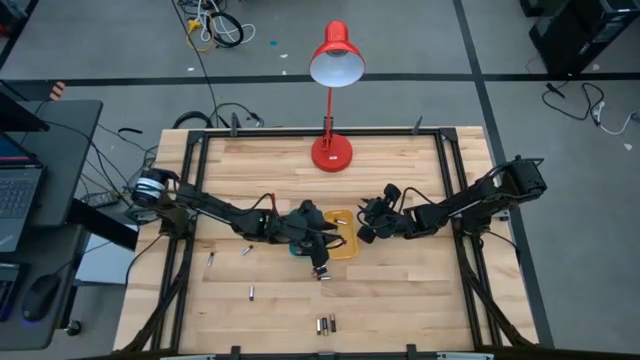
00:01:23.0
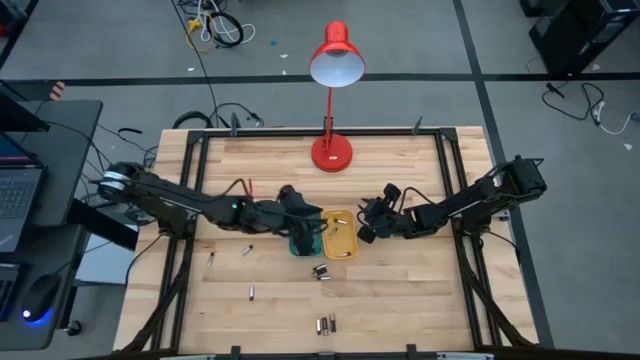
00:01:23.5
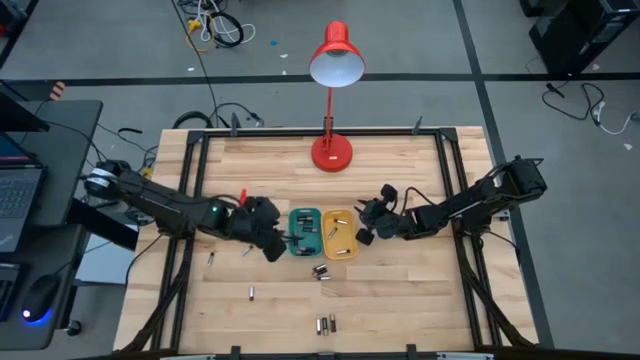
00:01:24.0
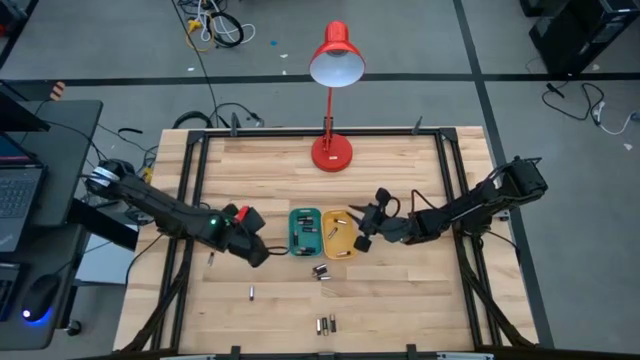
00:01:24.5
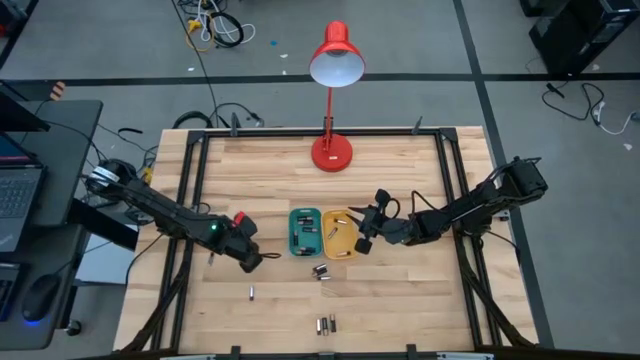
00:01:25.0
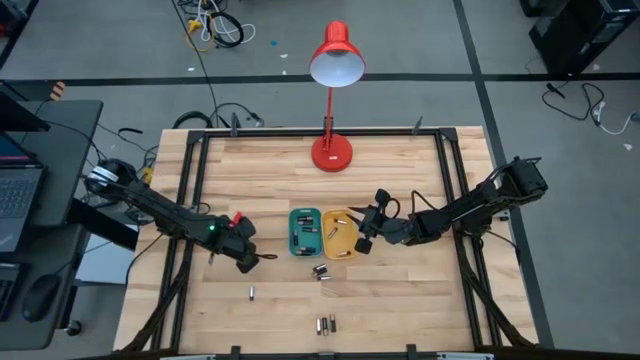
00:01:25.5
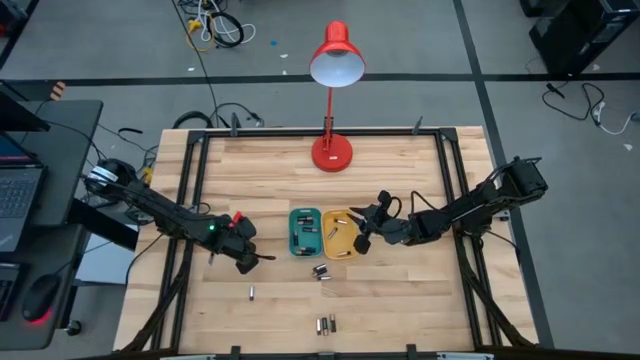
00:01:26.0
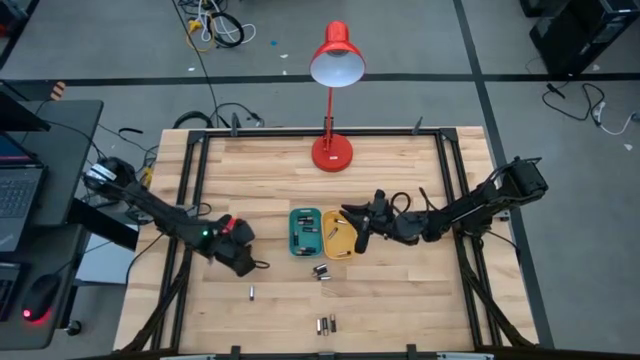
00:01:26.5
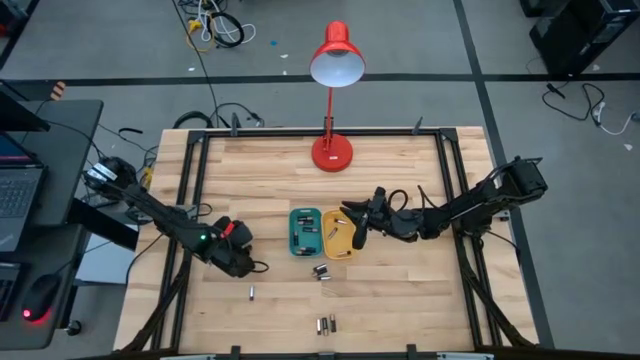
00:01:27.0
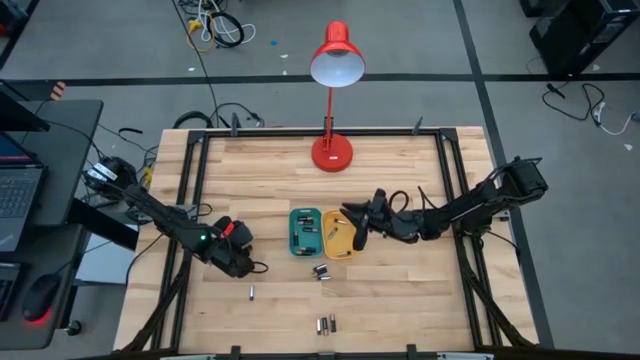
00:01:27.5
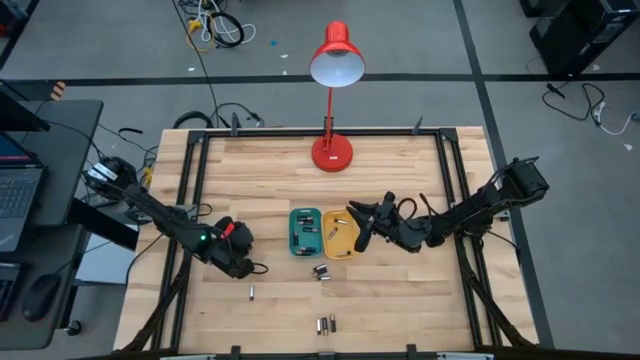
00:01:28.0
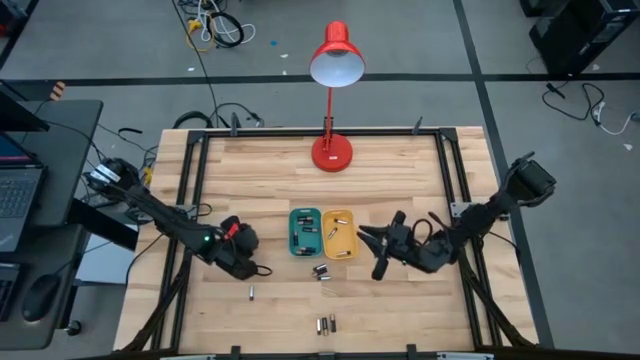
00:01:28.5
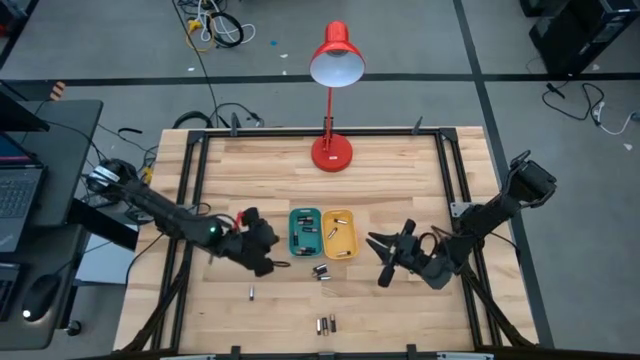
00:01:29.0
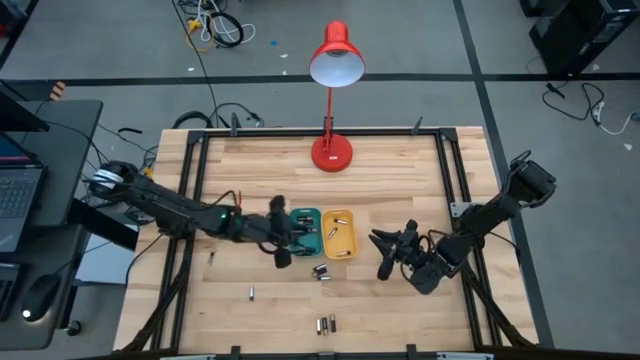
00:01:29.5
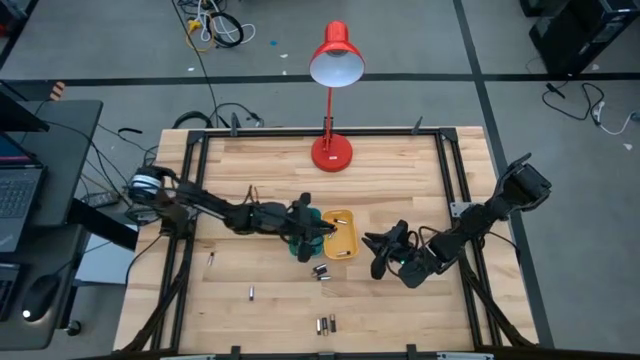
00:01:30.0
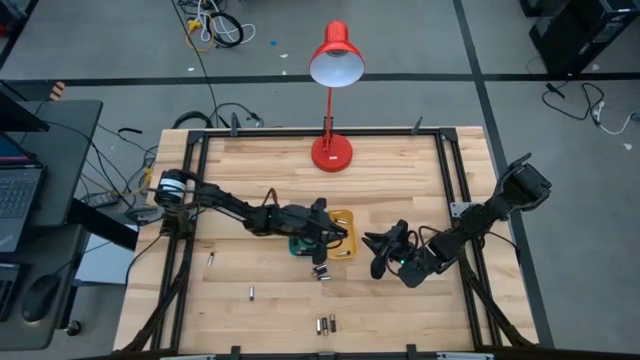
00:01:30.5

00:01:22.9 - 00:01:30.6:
Task: Sort batteries
Put the white battery into the yellow bin

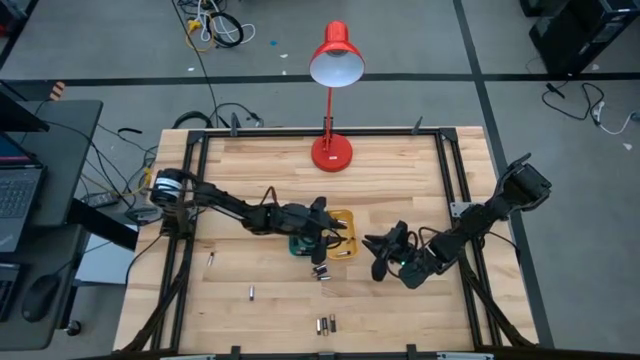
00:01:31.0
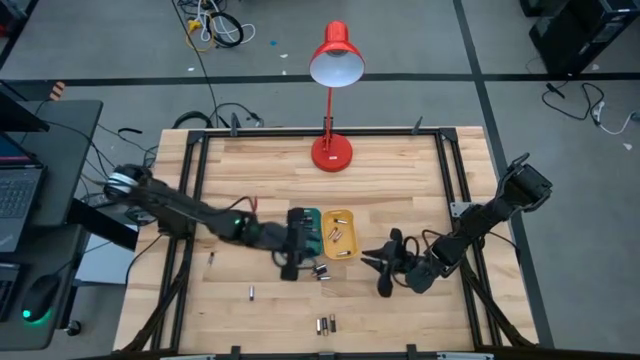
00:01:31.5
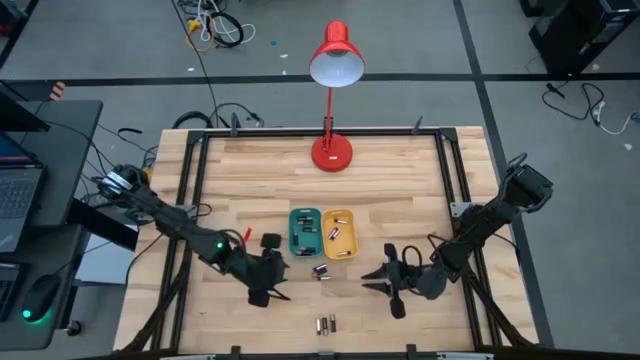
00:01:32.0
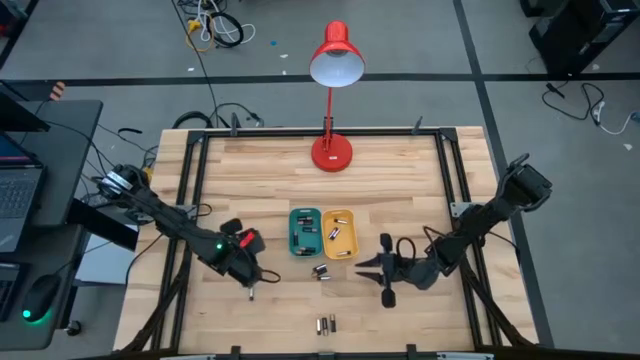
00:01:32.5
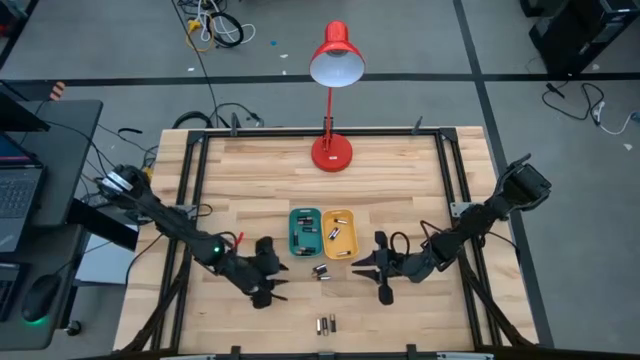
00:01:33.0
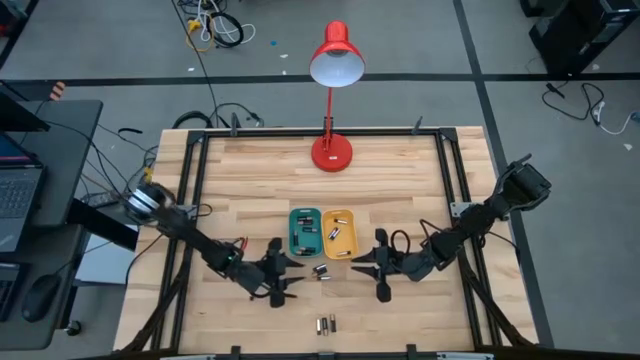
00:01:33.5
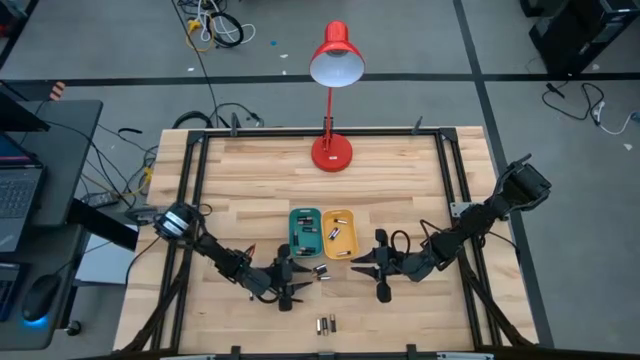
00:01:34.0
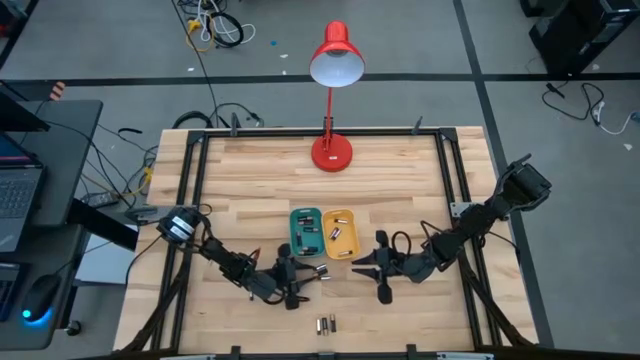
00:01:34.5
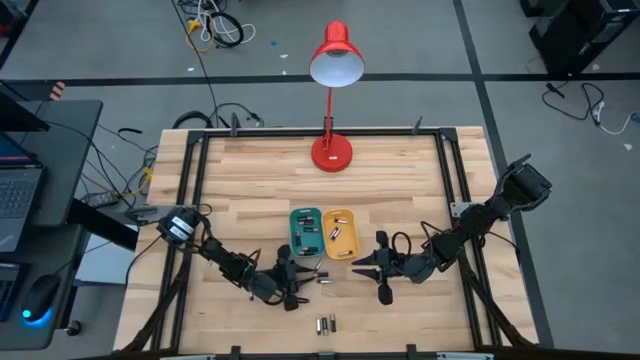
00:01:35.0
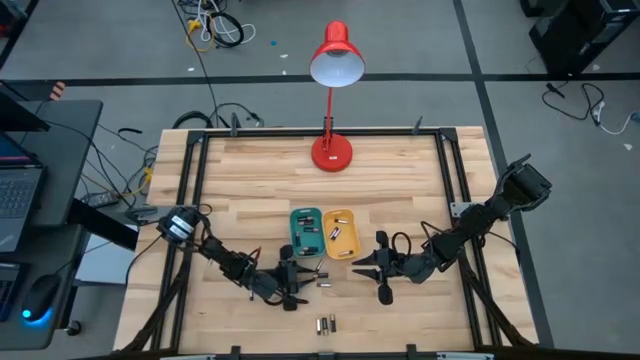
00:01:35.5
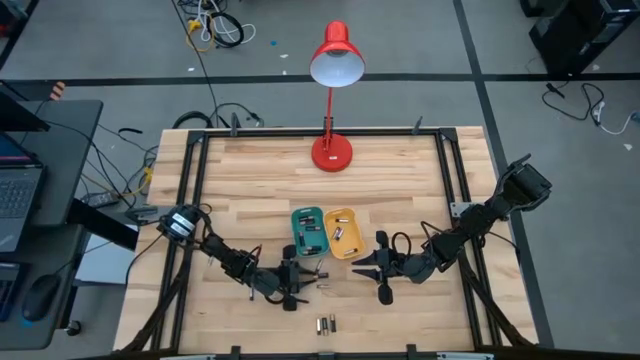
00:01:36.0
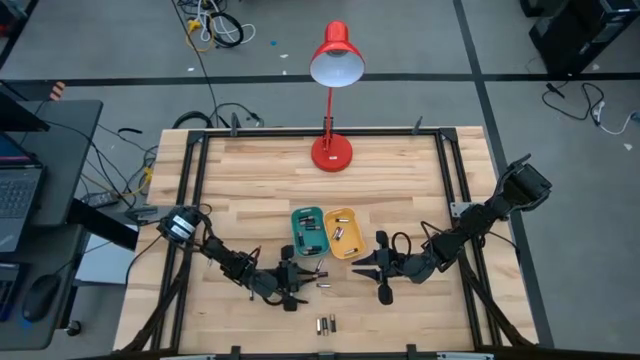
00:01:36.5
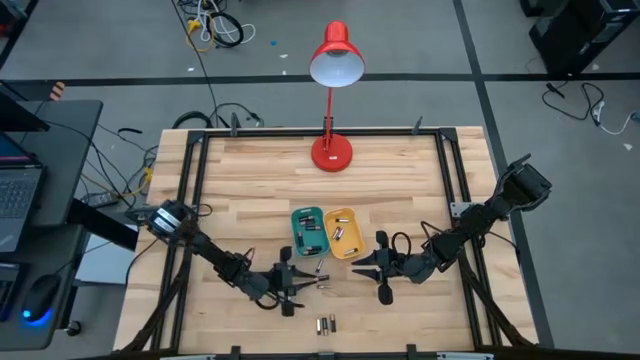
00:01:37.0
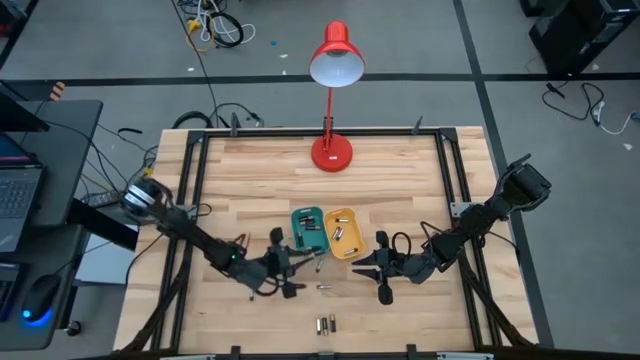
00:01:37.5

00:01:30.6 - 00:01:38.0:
Put the black battery into the blue bin

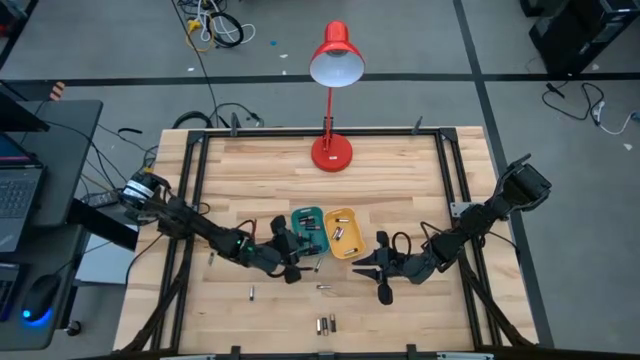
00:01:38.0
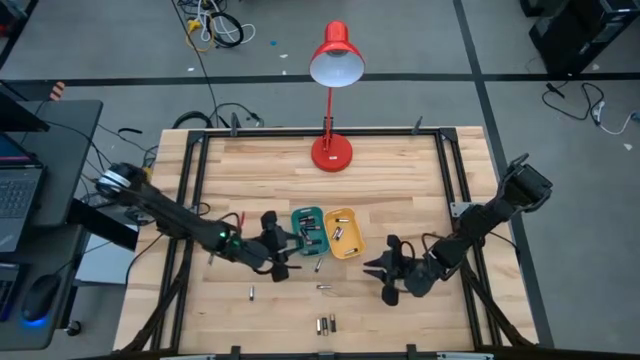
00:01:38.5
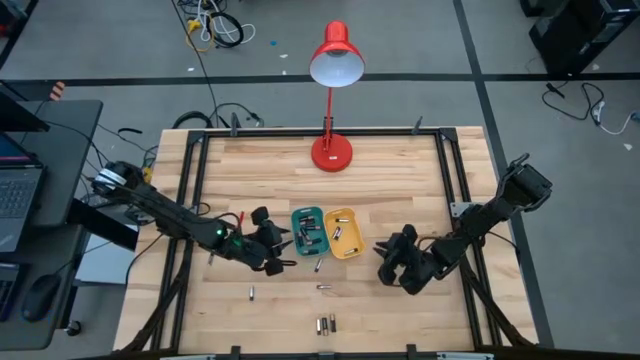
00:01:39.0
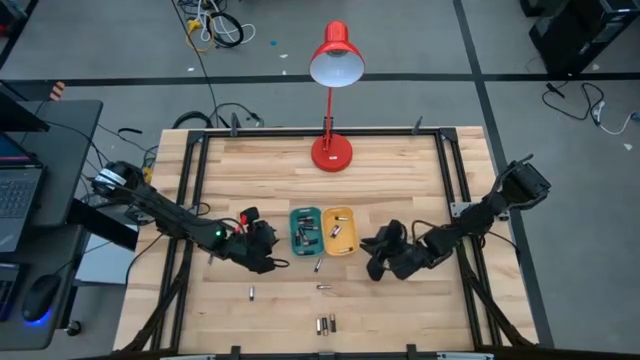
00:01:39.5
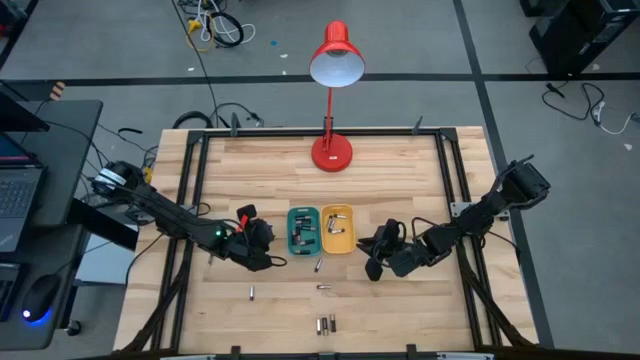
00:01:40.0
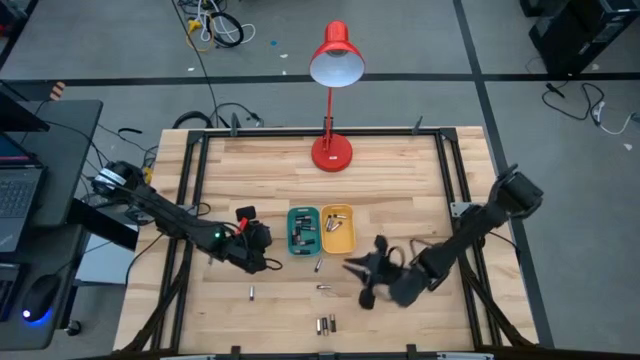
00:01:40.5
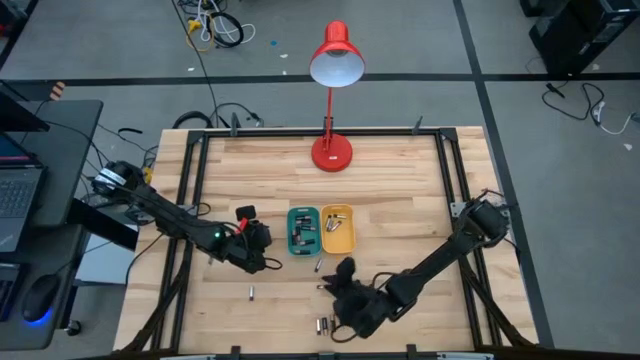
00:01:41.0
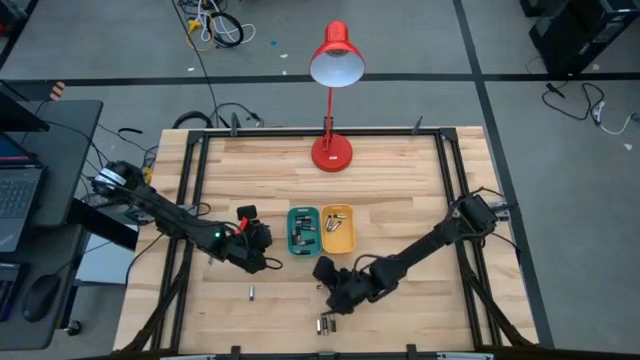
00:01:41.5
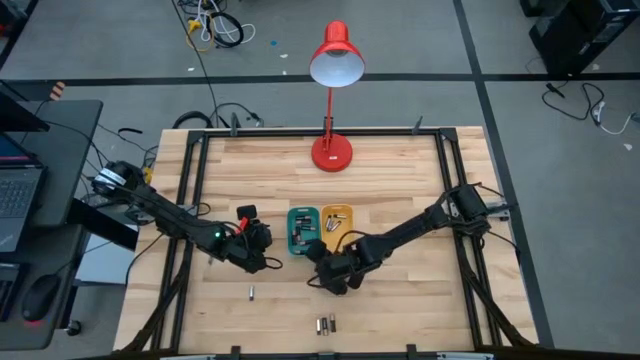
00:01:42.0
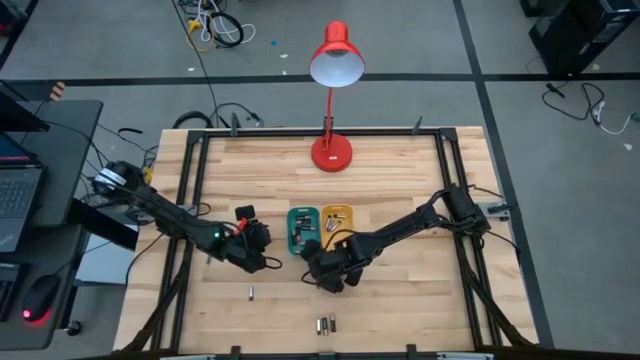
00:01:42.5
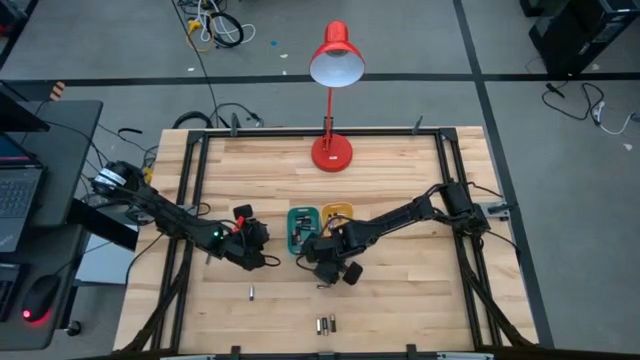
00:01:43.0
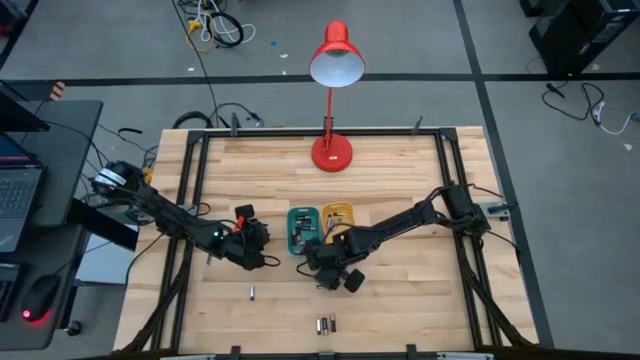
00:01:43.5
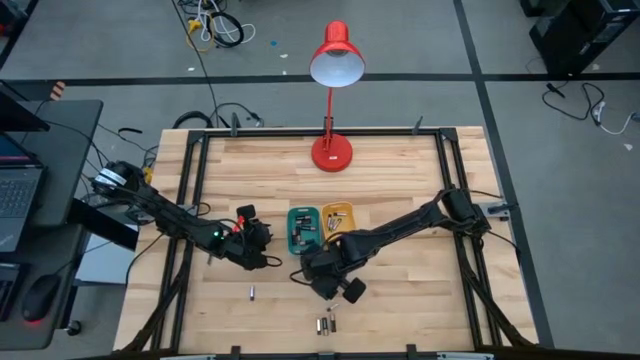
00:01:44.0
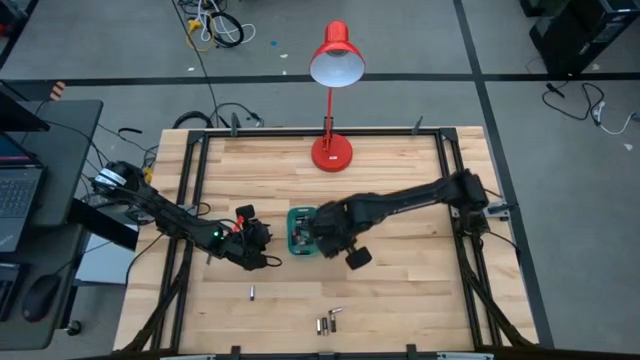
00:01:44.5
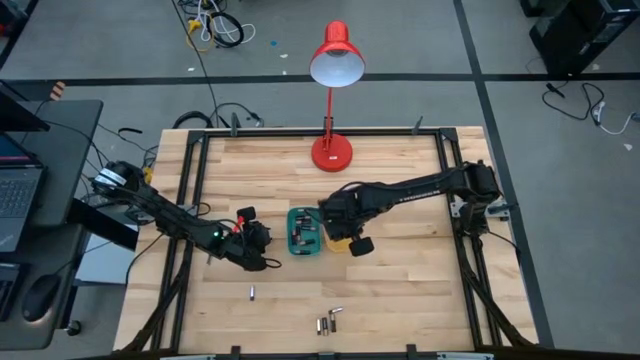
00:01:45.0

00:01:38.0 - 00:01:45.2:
Put the white battery into the yellow bin

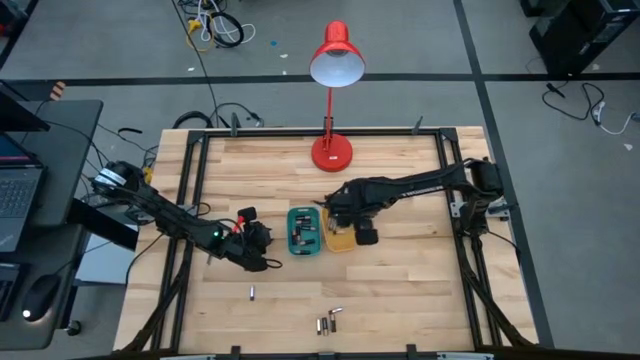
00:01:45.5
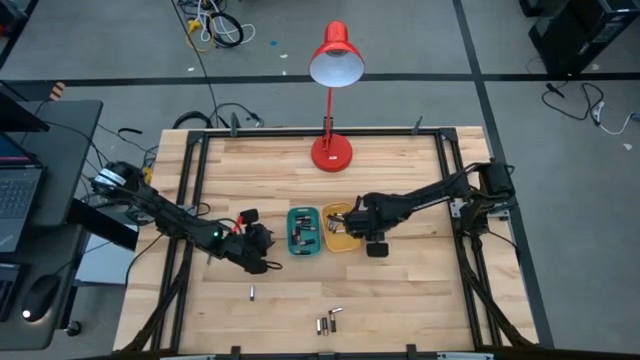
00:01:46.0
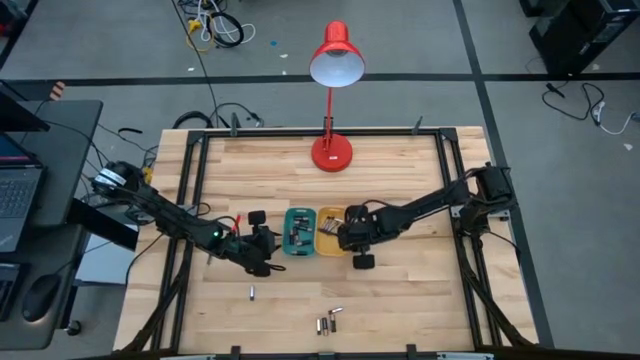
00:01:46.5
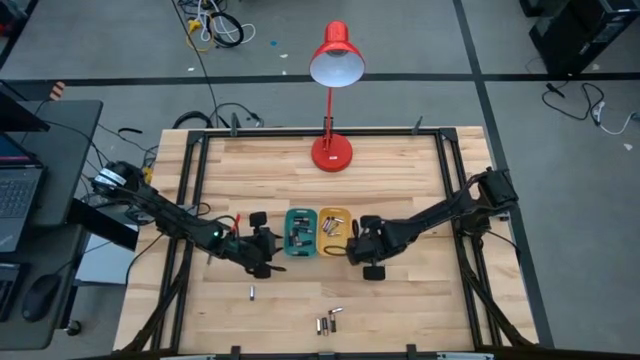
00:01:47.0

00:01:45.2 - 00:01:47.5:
Adjust the blue and yellow bins
